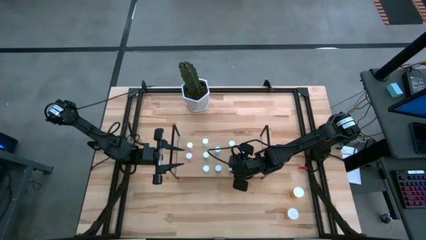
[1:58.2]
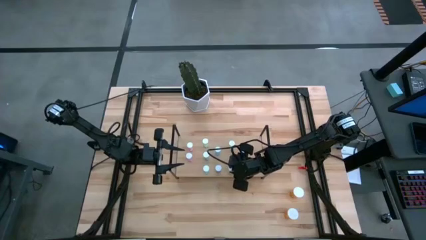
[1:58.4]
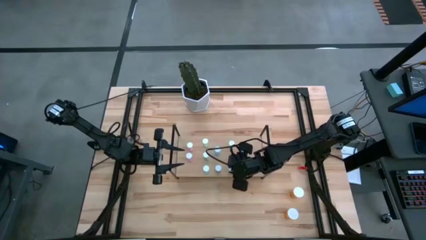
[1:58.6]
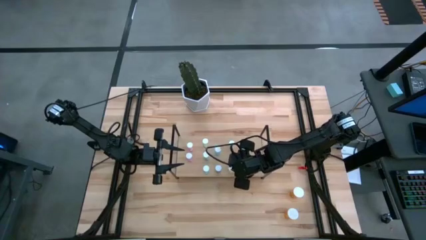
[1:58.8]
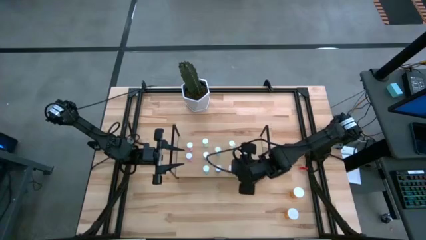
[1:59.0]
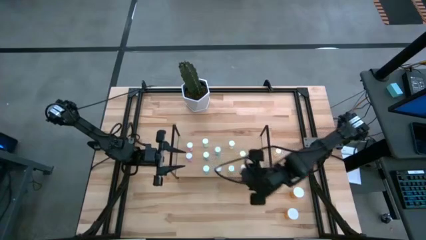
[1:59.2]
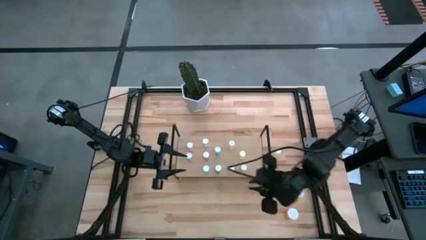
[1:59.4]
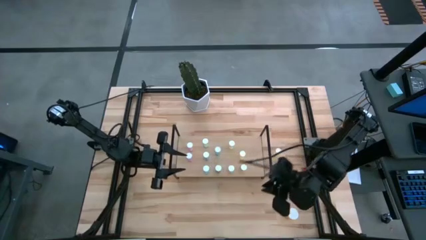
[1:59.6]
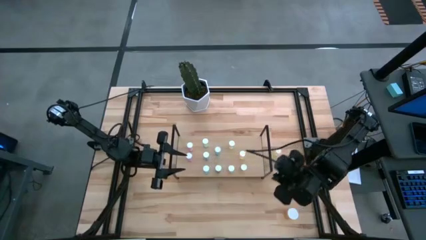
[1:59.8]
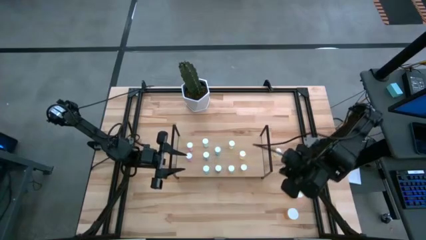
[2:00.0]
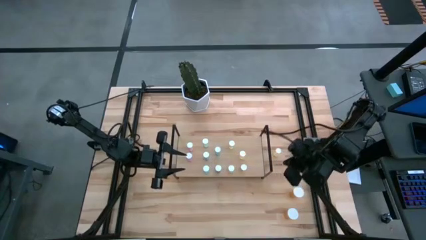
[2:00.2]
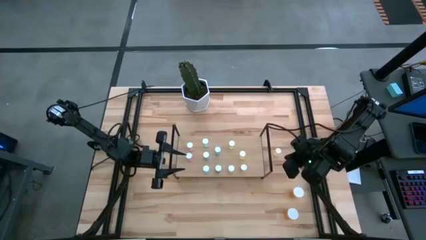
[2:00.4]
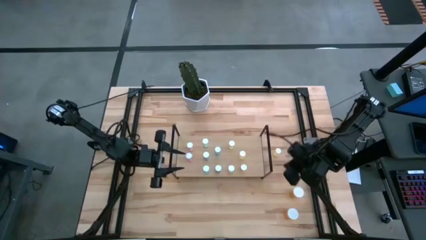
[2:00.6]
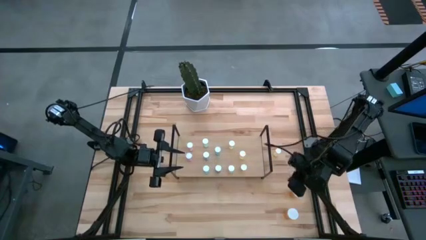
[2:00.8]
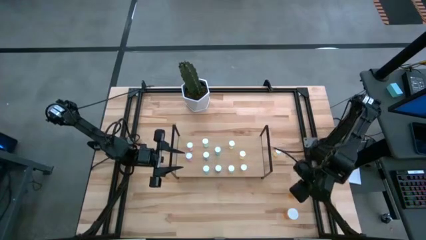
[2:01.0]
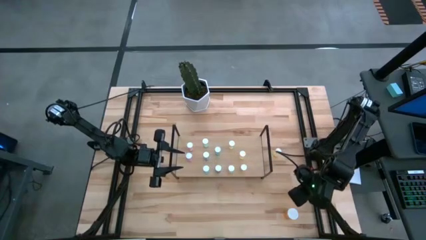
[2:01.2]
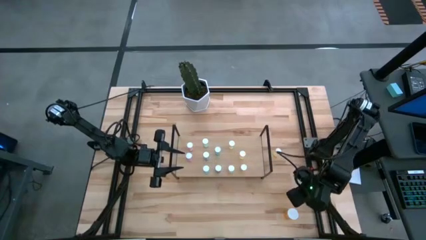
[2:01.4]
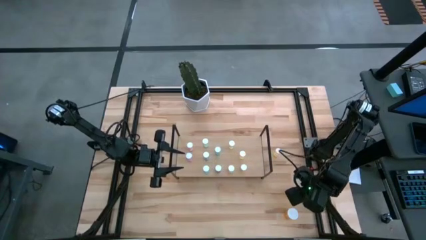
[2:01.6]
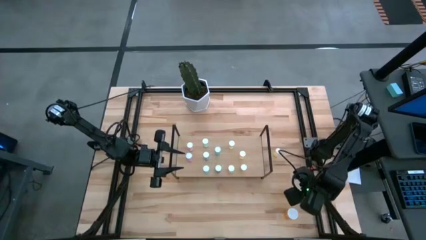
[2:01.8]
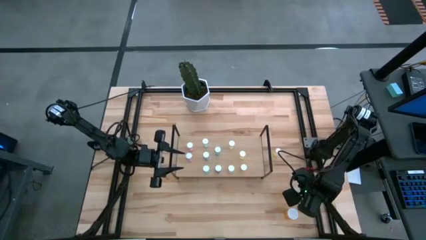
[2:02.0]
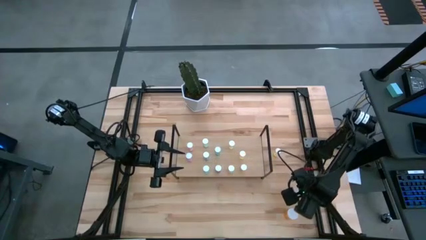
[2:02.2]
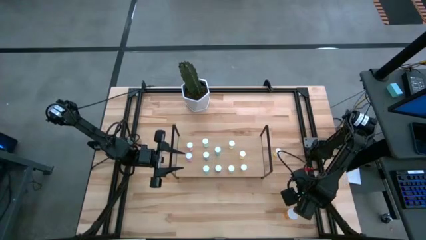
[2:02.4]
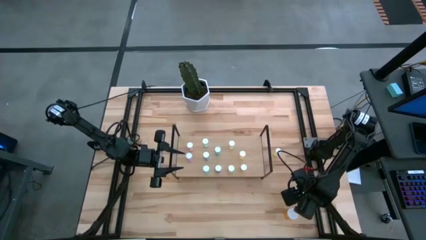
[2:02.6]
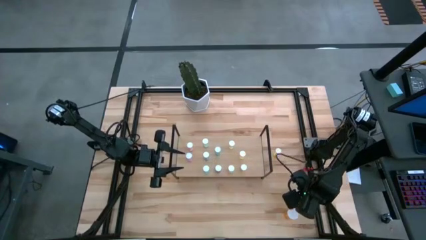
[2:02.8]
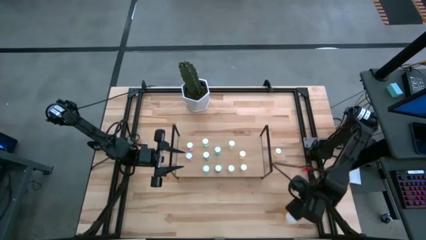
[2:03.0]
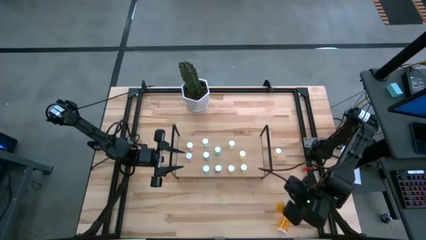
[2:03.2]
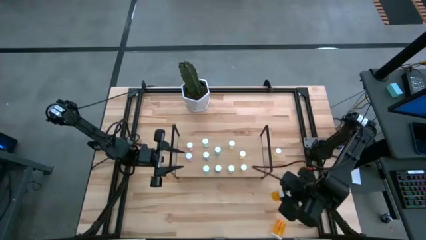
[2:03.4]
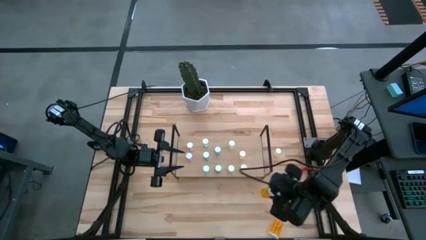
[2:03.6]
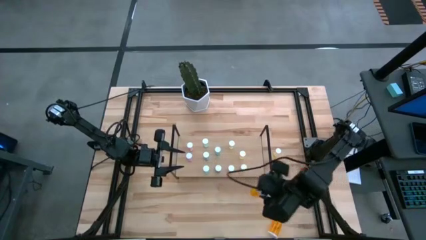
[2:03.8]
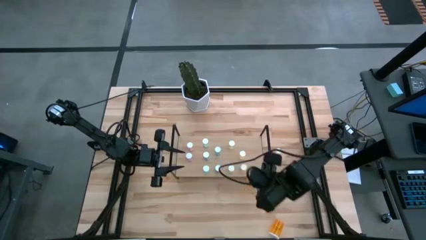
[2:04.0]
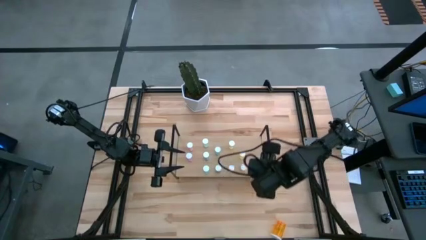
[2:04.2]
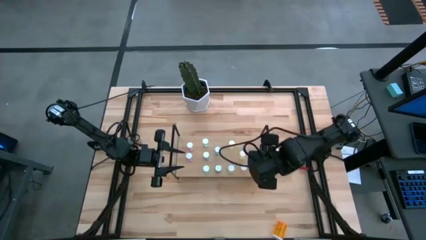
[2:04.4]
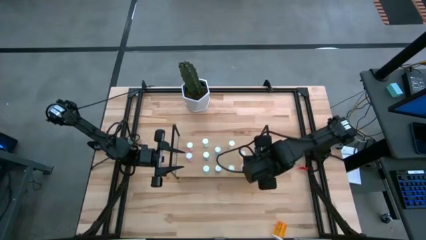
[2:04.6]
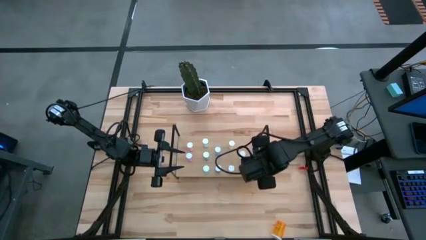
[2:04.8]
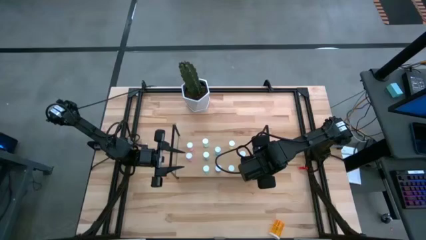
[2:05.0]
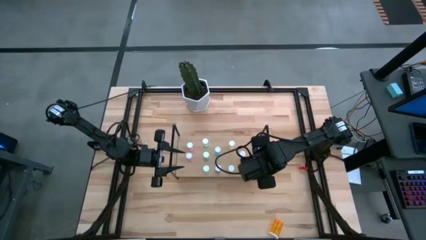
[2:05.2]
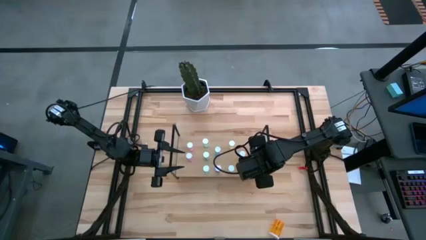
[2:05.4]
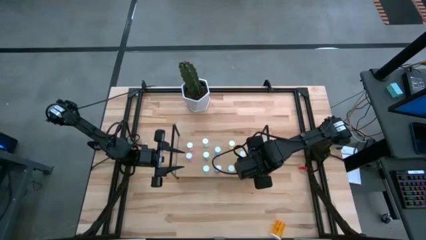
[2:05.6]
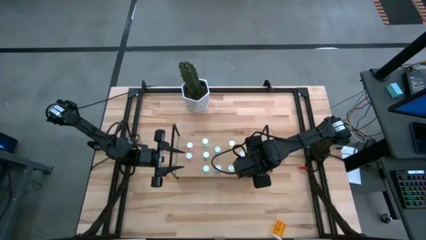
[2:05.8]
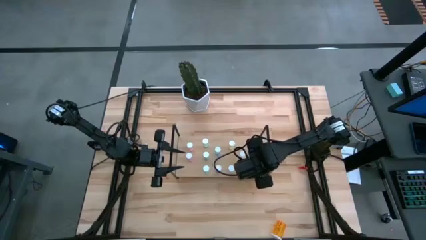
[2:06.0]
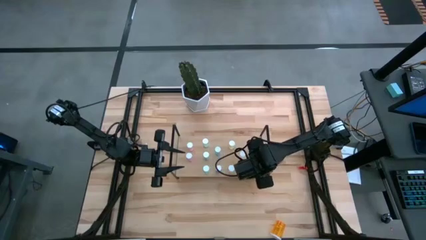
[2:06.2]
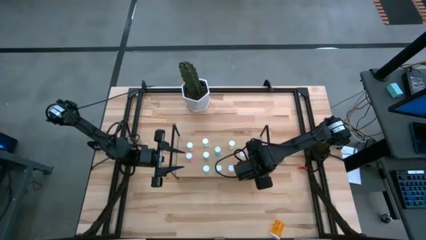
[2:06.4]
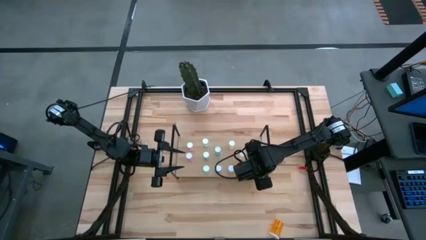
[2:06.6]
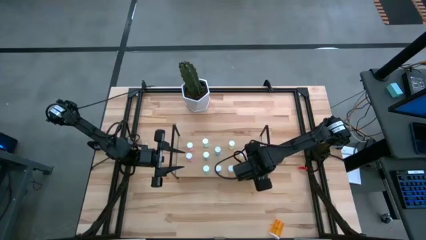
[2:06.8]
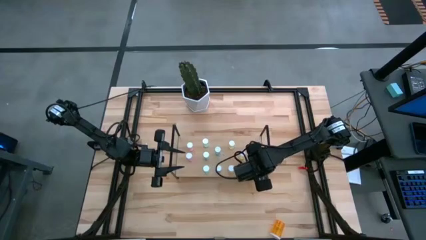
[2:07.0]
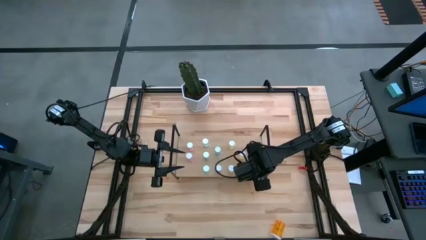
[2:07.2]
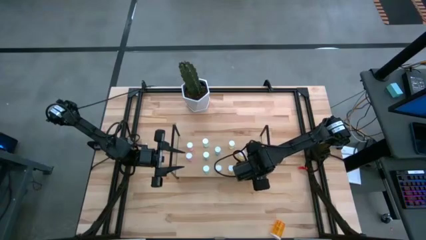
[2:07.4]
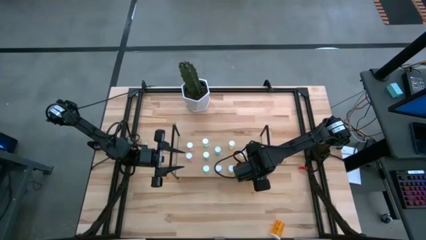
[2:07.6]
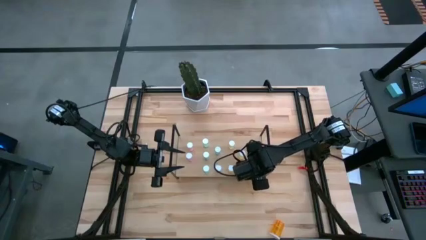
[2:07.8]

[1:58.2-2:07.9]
Task: Pick and place medicine bottles onto shelf by color
Put the orange pill bottle on the shelf

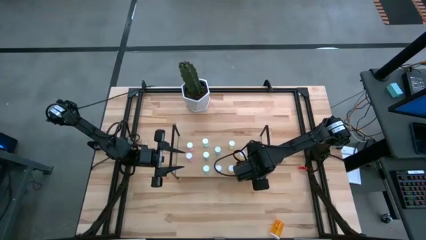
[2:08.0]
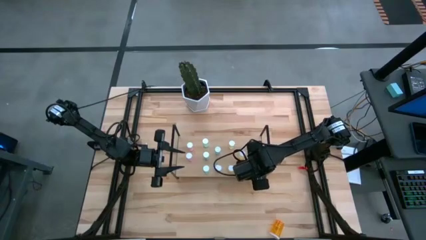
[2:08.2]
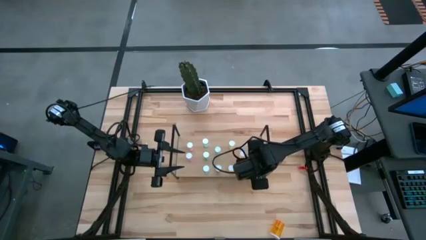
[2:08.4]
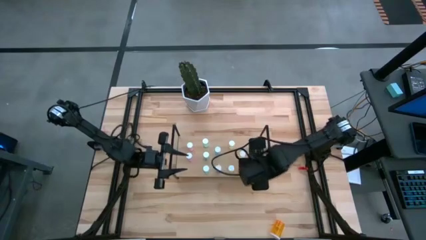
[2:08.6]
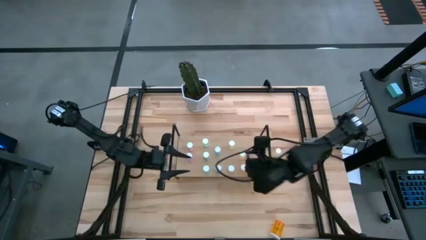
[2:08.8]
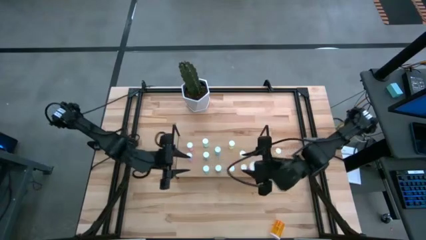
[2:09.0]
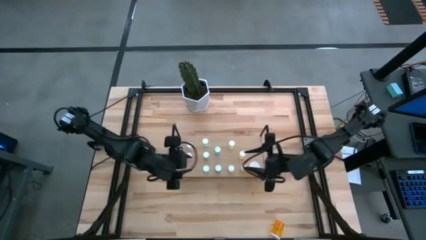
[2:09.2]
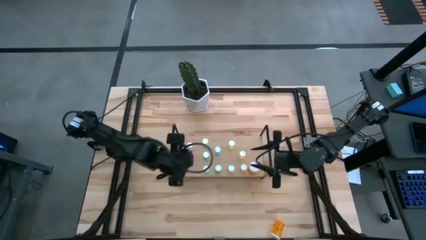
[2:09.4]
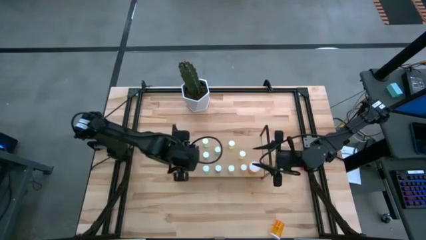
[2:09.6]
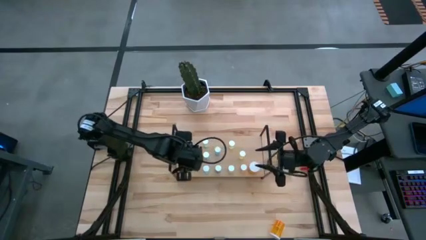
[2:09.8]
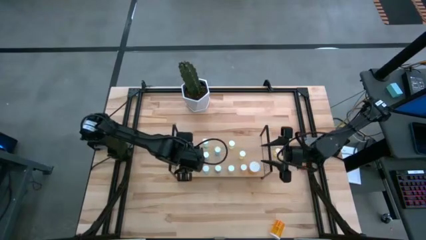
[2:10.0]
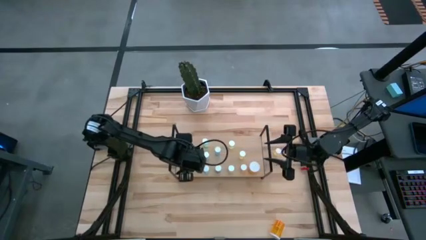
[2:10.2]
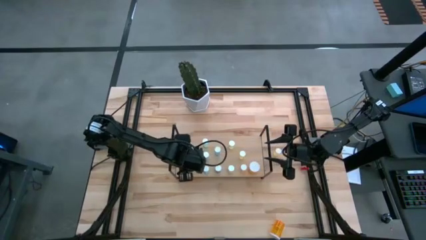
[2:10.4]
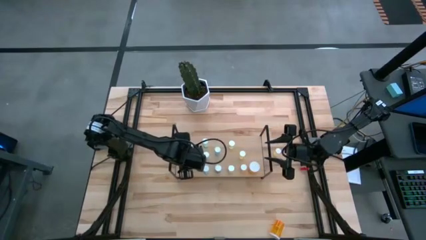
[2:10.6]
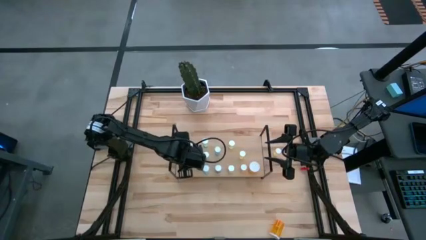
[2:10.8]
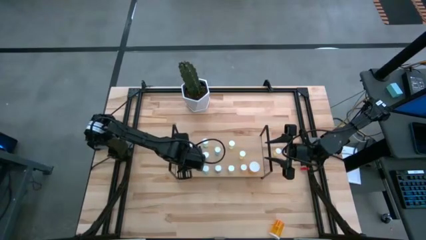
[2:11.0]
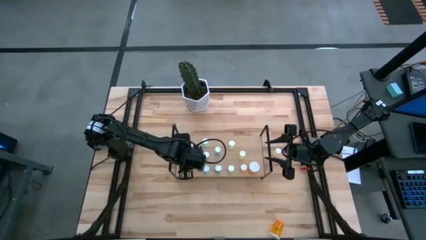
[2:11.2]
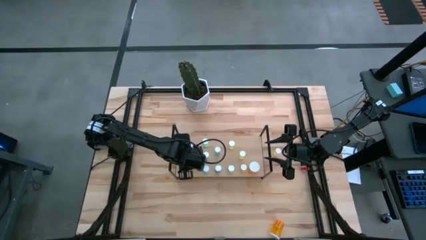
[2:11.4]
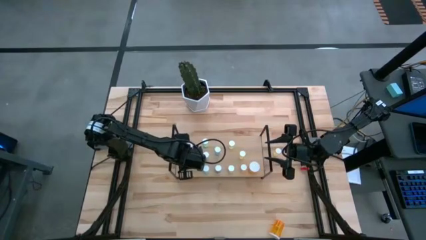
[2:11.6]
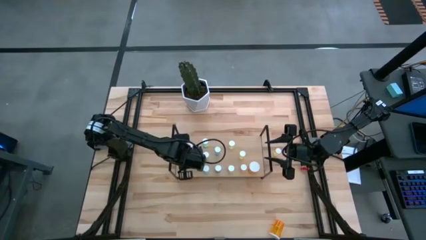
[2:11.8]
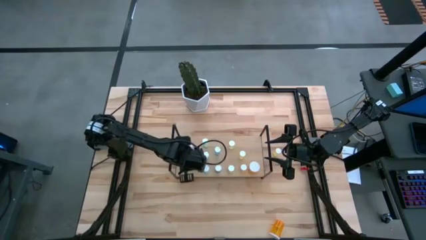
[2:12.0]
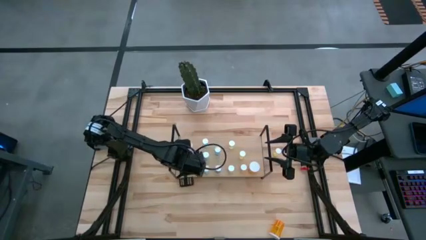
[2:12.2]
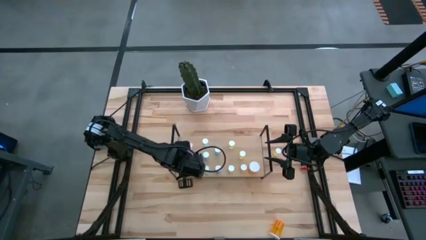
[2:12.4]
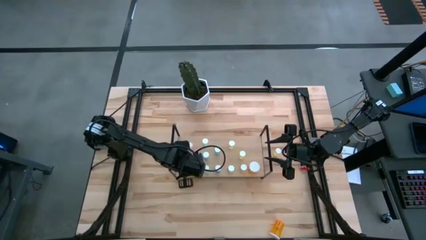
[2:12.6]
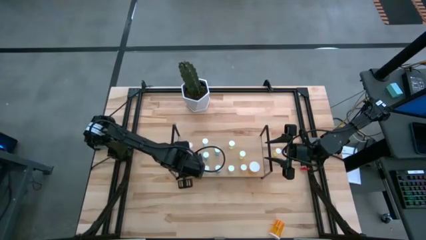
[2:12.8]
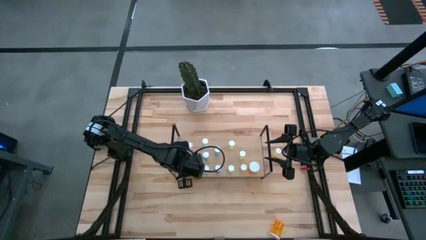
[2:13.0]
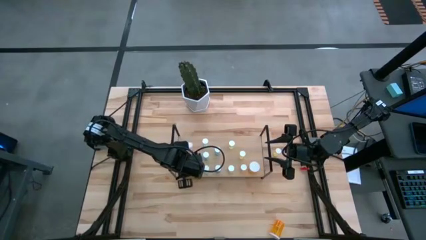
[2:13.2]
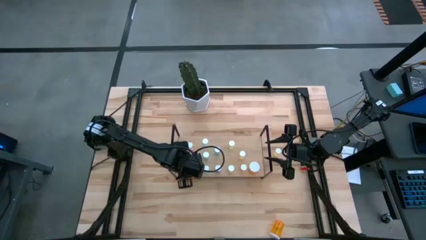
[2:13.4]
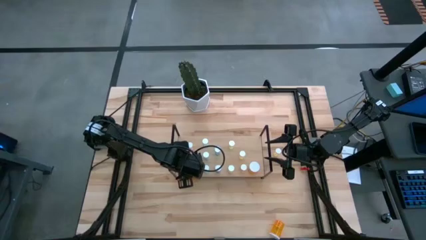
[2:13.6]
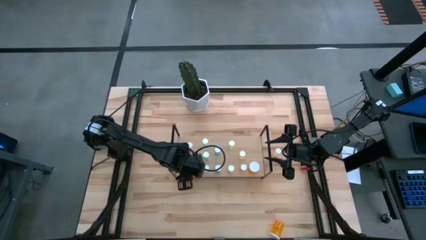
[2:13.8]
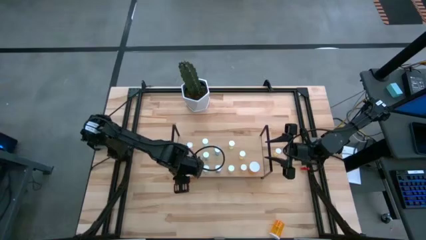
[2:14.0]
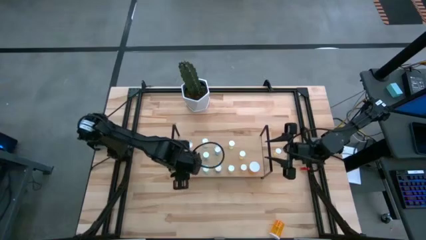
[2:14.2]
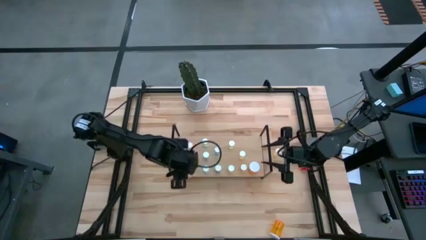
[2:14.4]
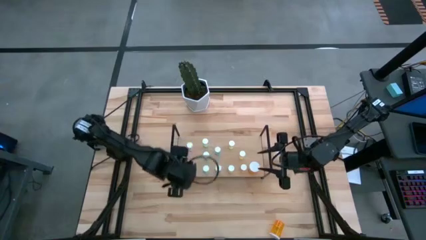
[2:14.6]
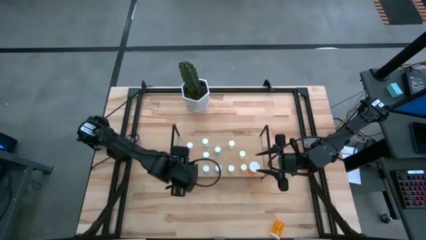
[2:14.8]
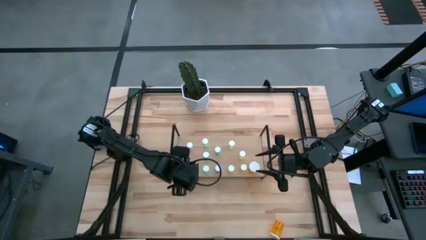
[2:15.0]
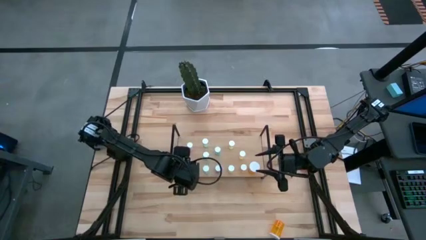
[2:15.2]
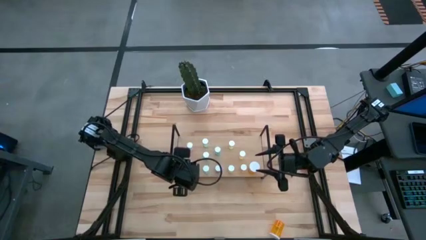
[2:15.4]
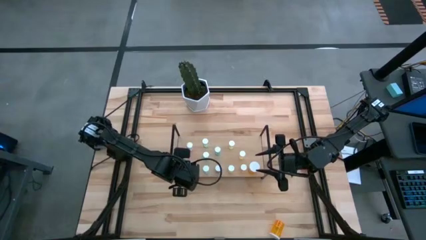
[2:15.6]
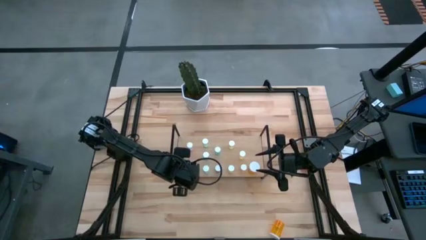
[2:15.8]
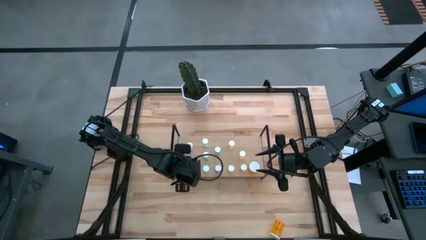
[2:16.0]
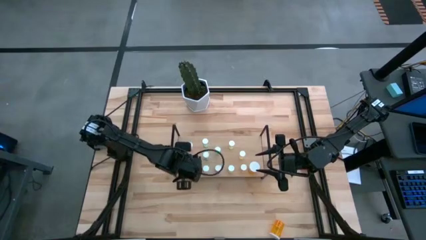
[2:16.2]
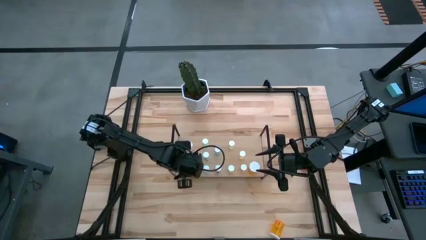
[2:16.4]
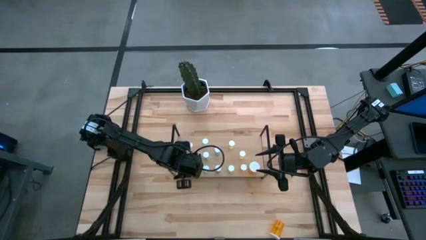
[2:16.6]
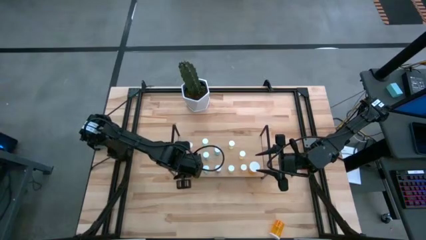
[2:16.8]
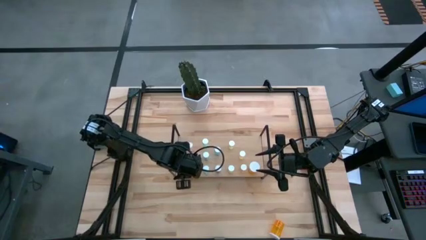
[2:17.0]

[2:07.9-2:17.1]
Adjust the pink pill bottle on the shelf
